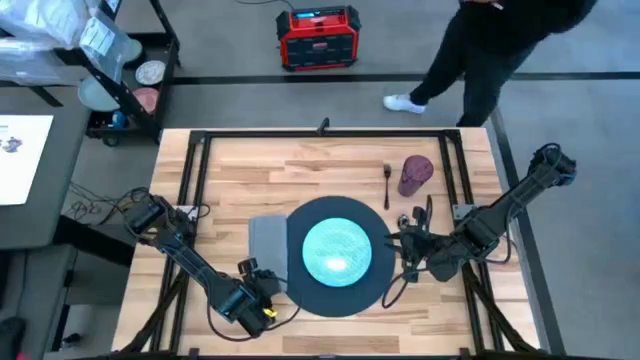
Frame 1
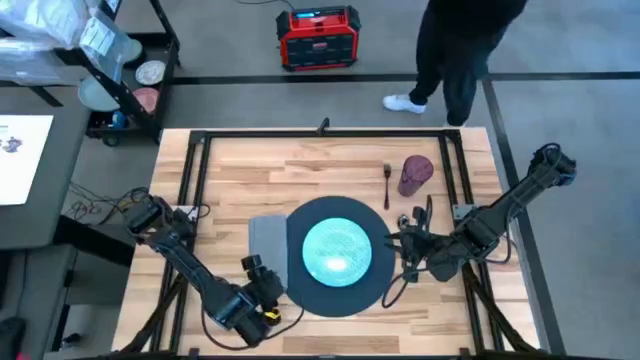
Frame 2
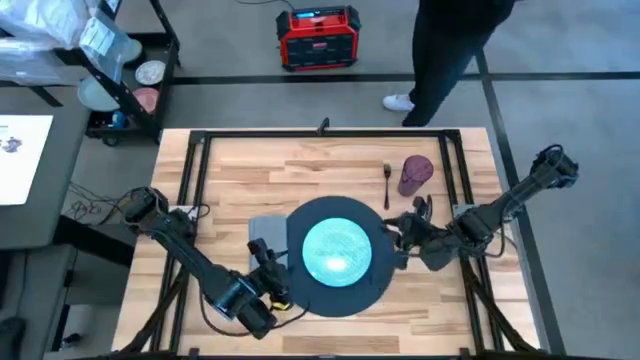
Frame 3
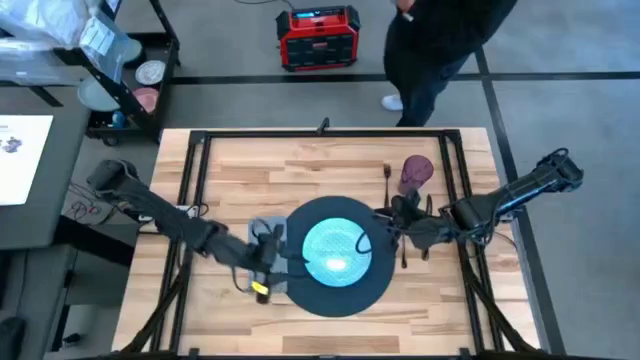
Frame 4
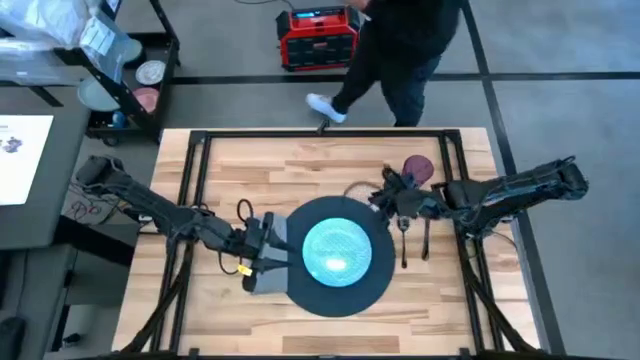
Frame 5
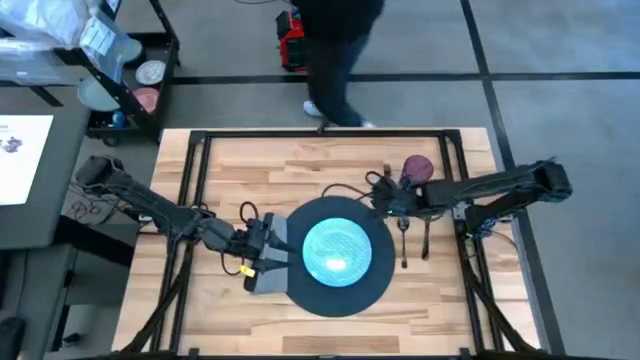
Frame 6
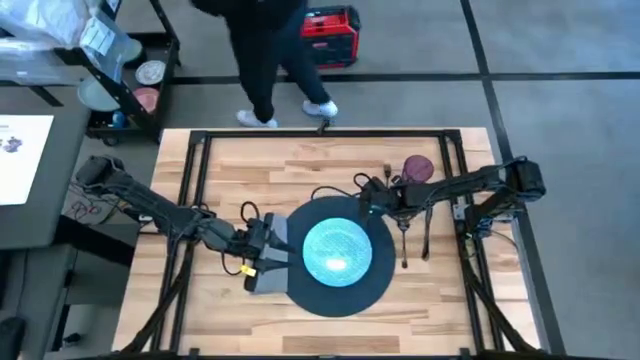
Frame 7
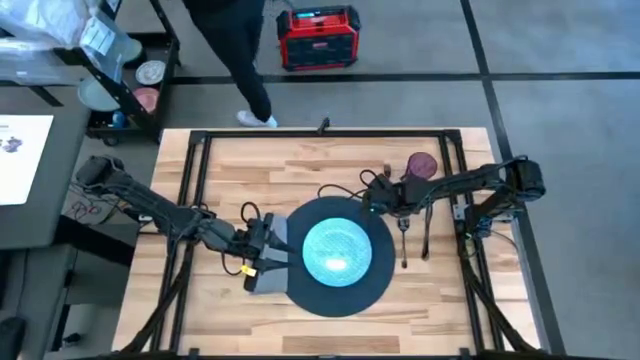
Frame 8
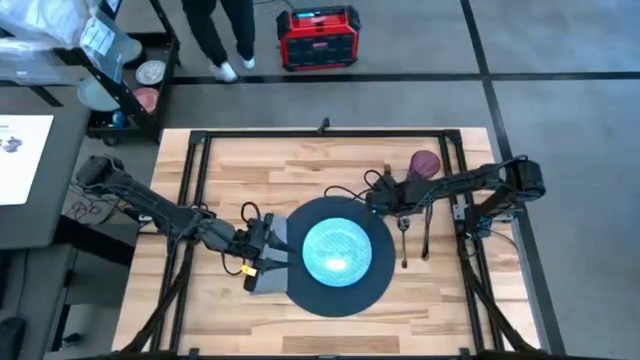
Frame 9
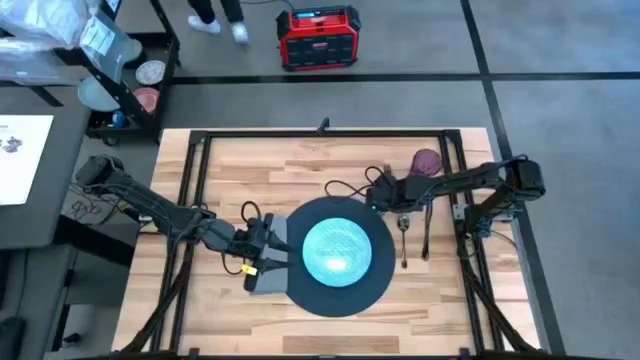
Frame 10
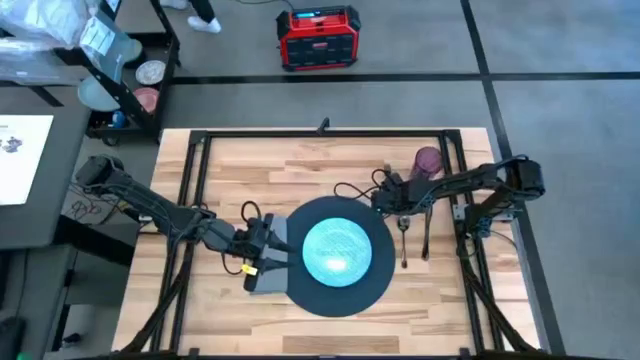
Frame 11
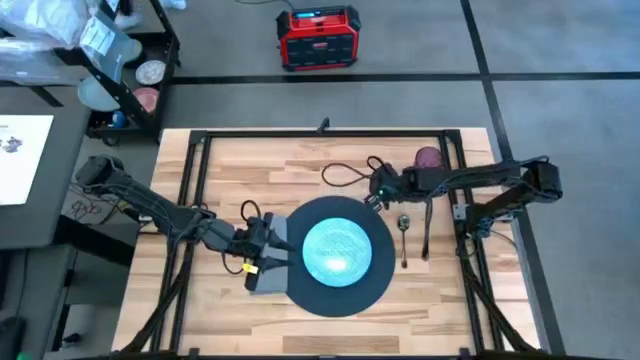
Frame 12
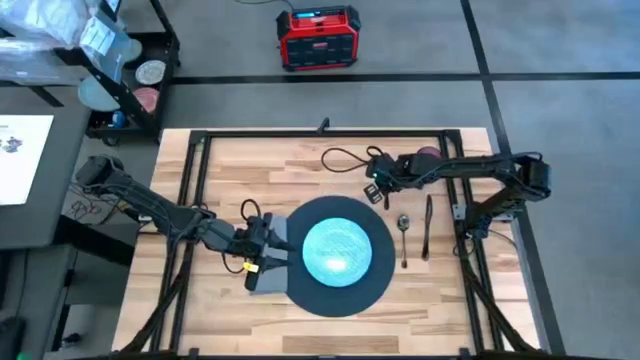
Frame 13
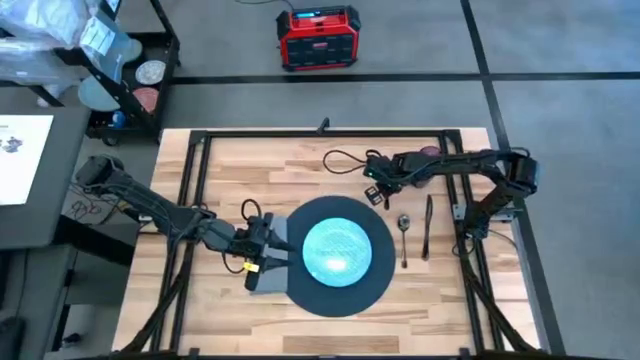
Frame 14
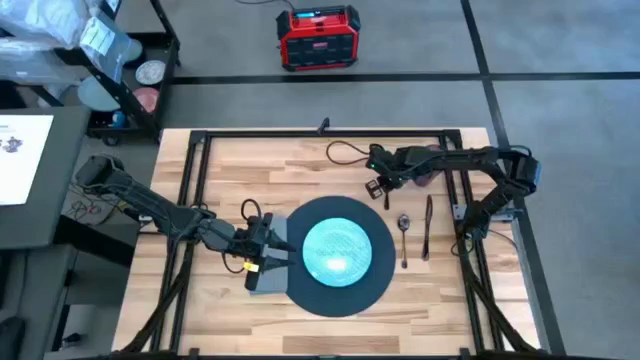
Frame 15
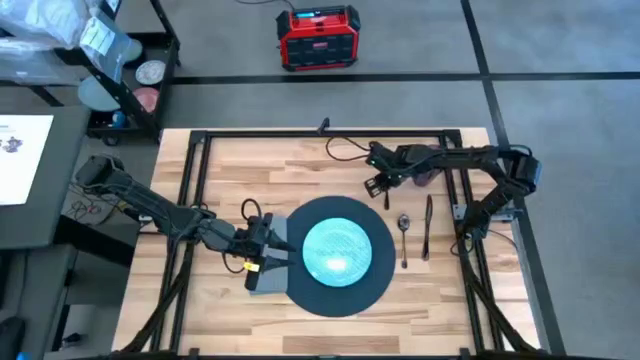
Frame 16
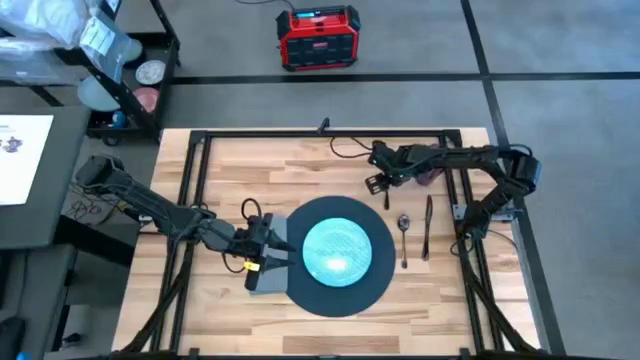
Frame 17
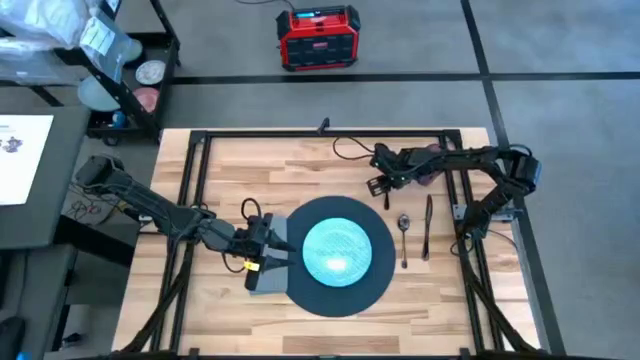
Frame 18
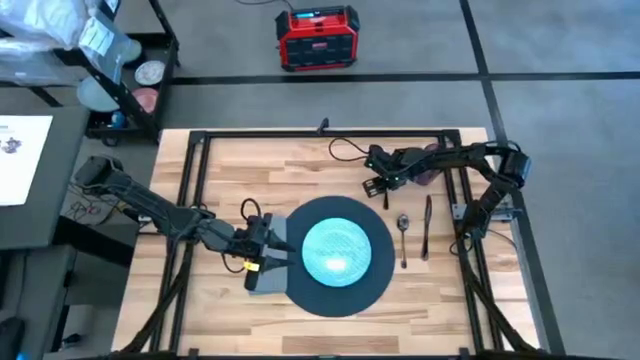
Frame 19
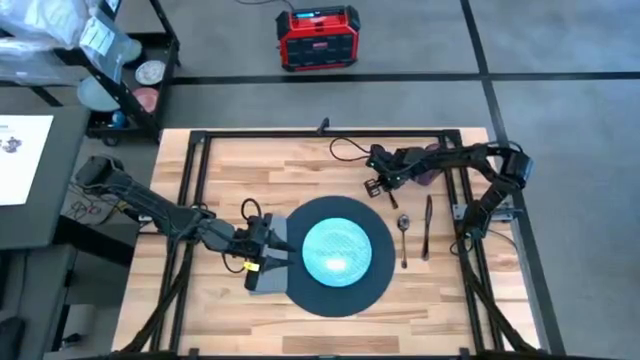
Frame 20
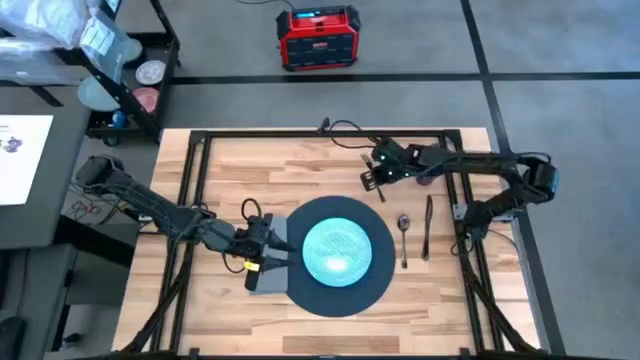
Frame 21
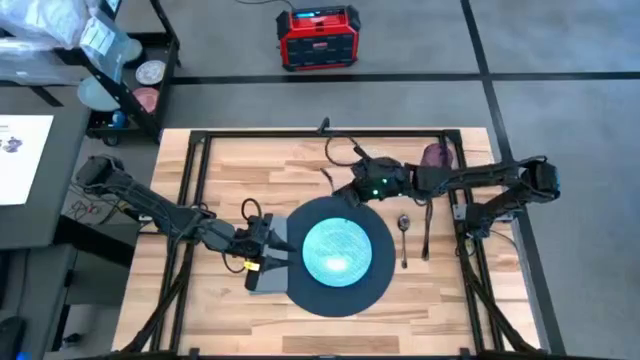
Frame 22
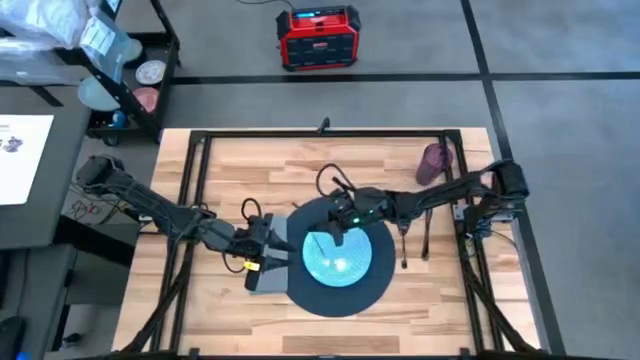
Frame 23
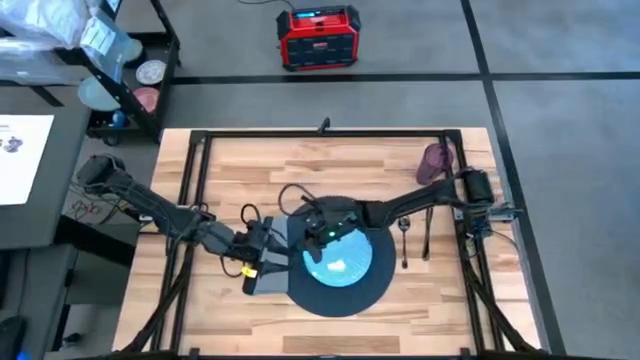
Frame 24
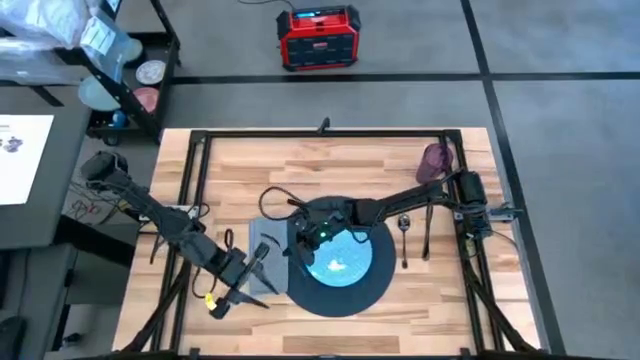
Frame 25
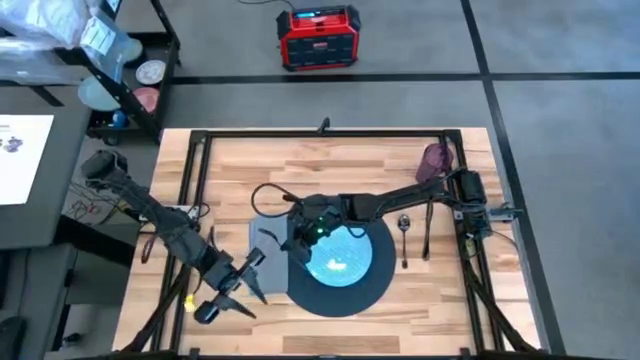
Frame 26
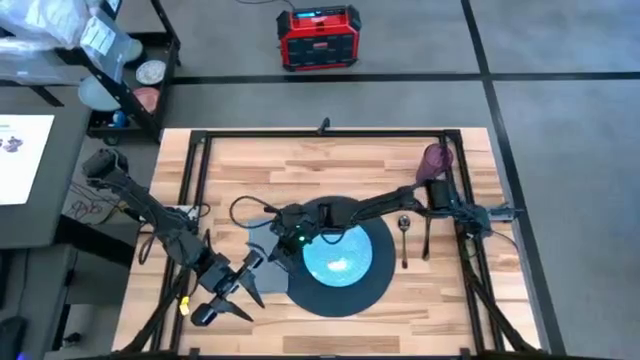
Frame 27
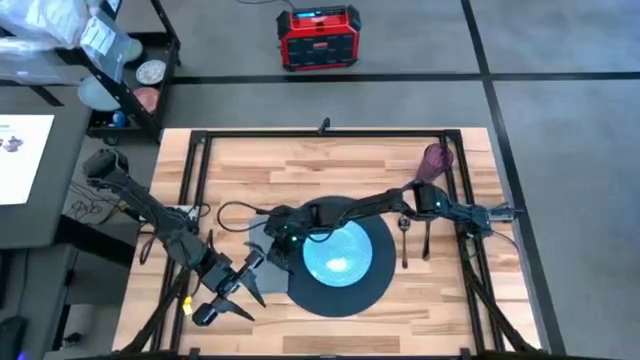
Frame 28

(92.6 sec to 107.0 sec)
Task: Set table place
Put the black fork on the gray table napkin

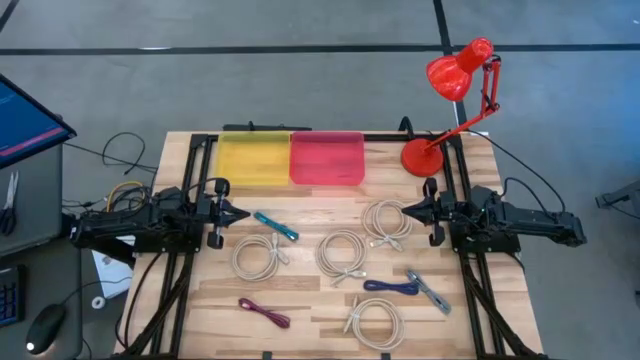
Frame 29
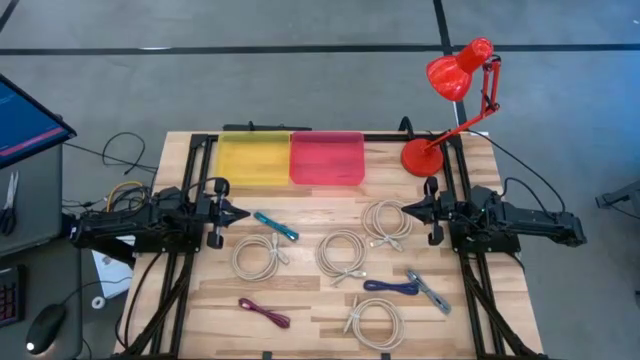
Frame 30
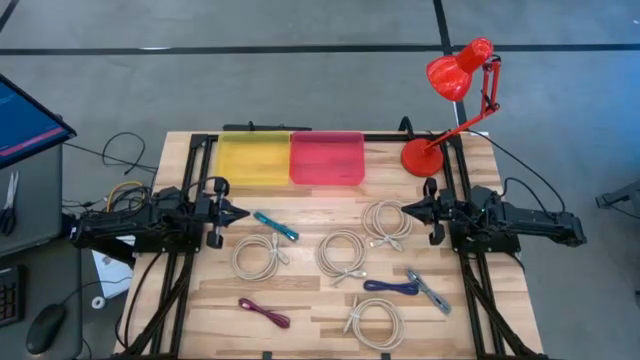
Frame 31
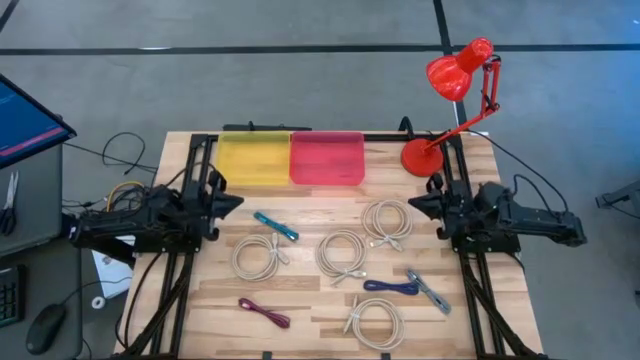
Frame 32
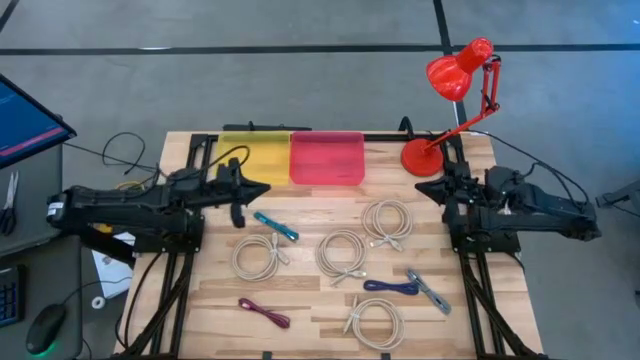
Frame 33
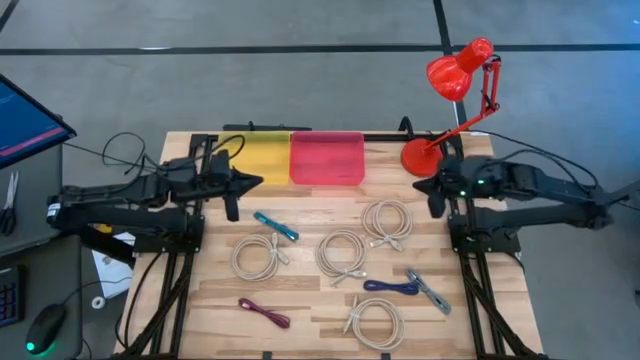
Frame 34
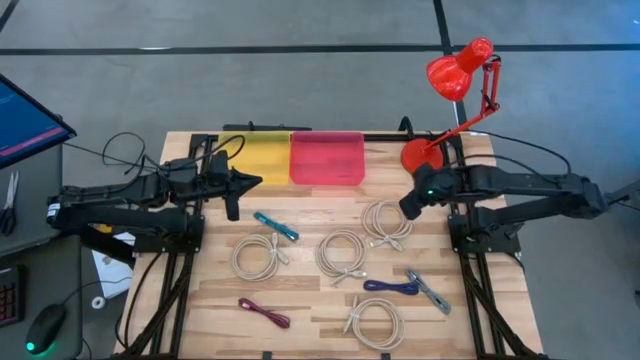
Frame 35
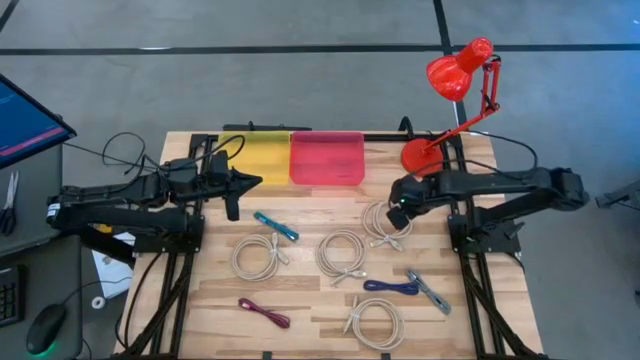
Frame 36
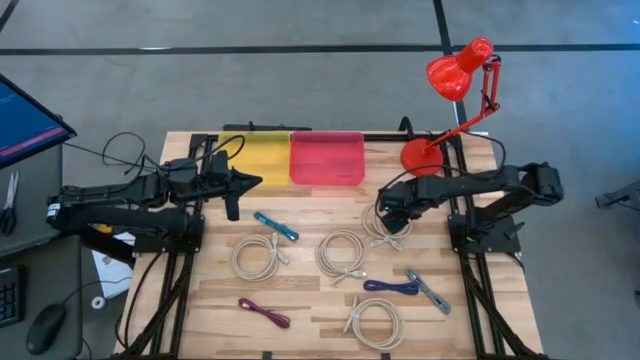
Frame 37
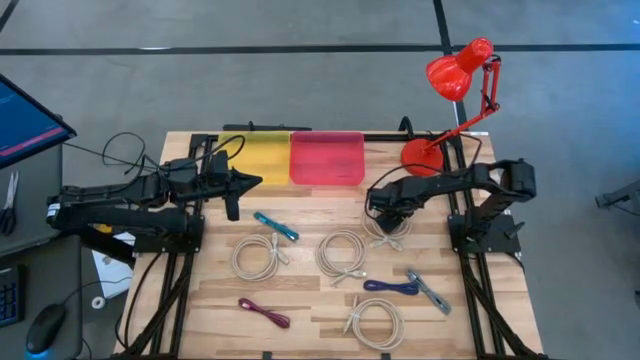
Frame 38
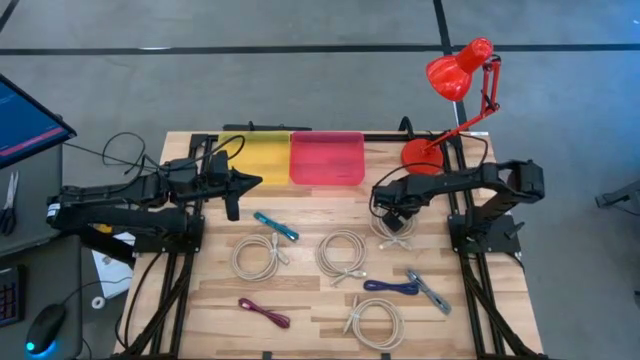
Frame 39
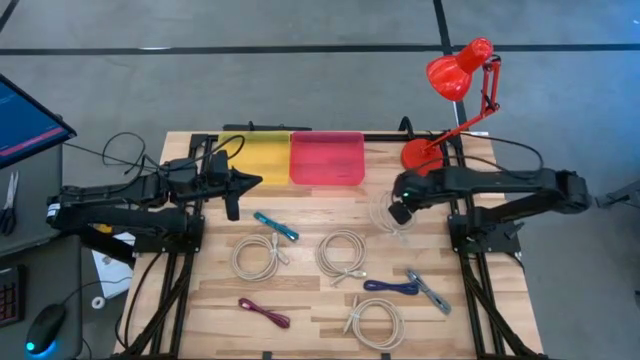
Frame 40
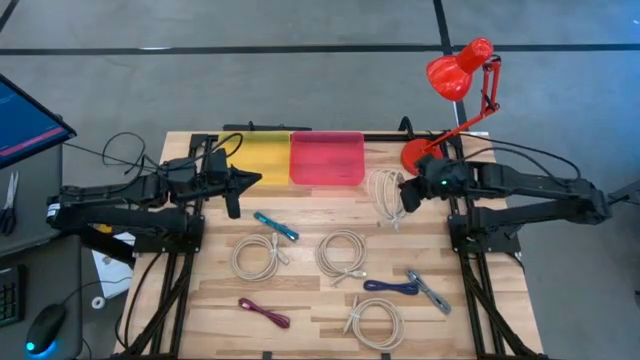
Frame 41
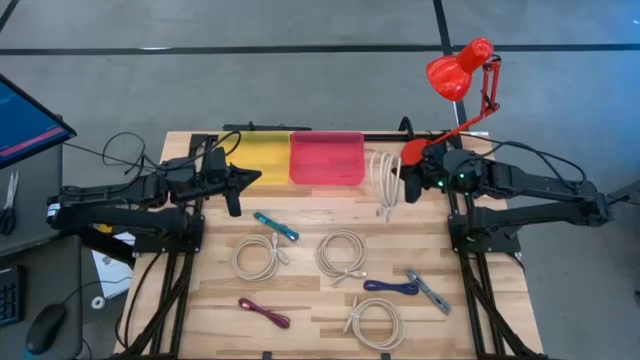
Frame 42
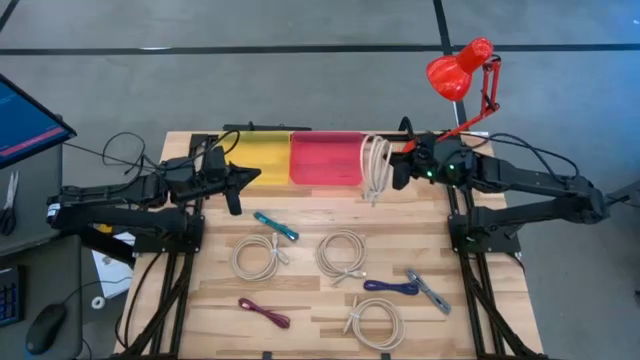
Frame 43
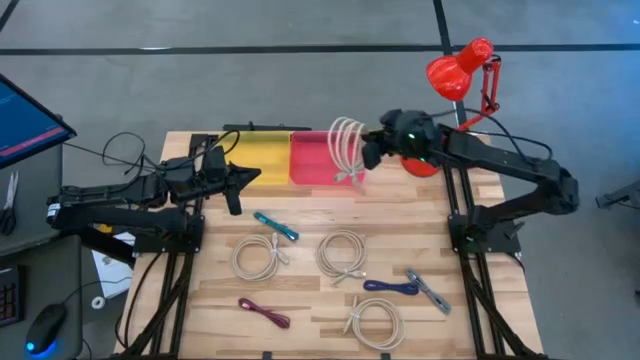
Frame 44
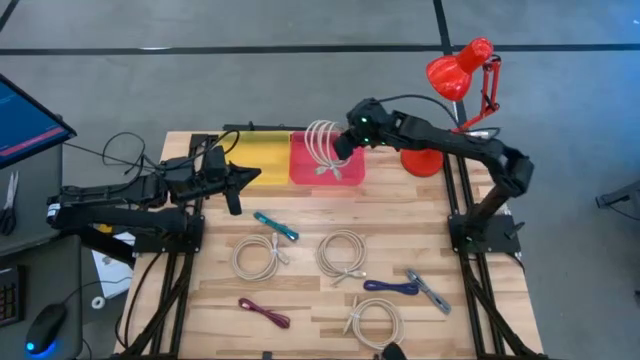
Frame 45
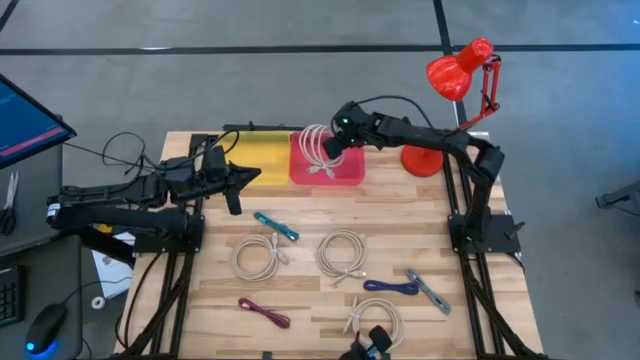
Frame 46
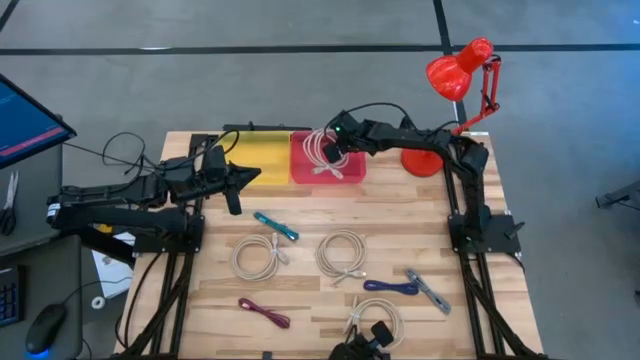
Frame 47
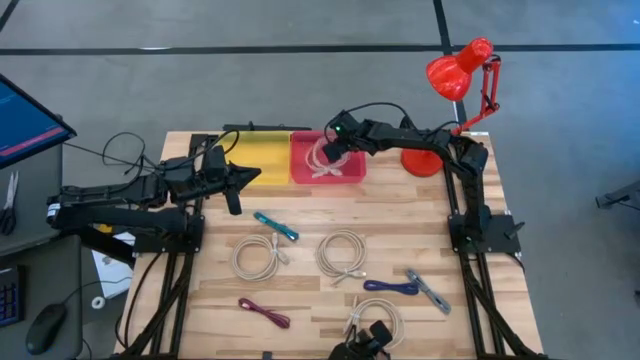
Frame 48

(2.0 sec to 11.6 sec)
Task: Pick & Place USB Port
Put the brown HDMI cable into the pink bin
